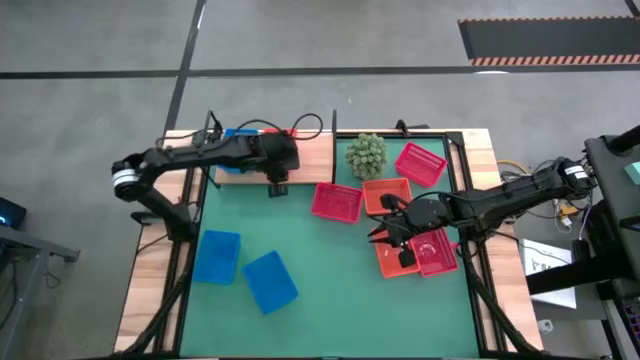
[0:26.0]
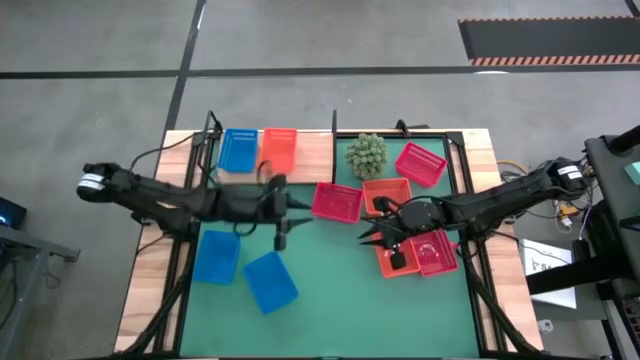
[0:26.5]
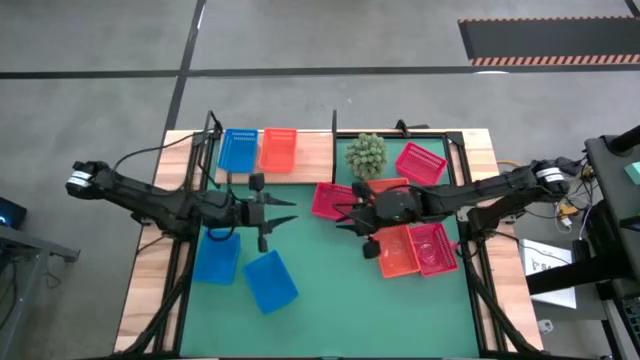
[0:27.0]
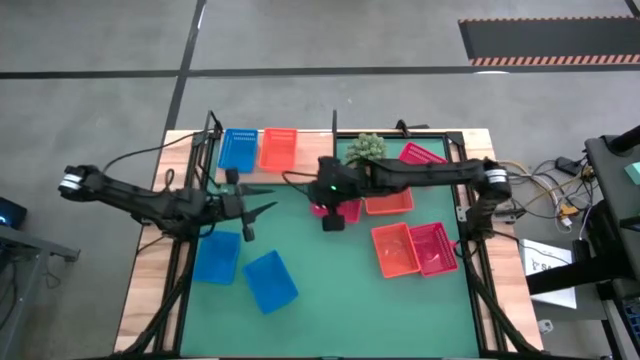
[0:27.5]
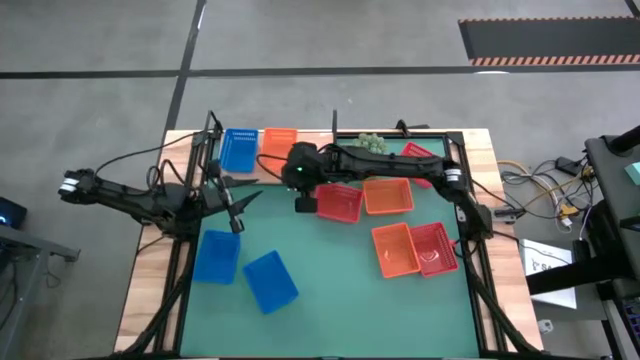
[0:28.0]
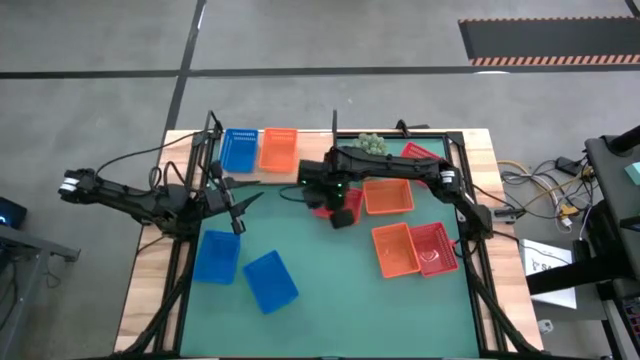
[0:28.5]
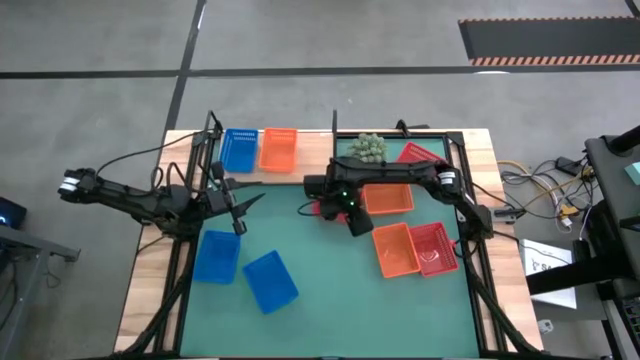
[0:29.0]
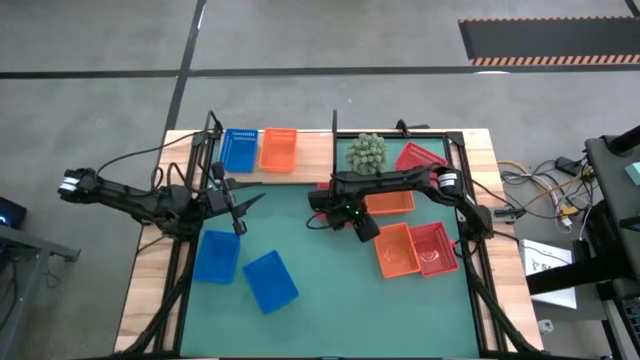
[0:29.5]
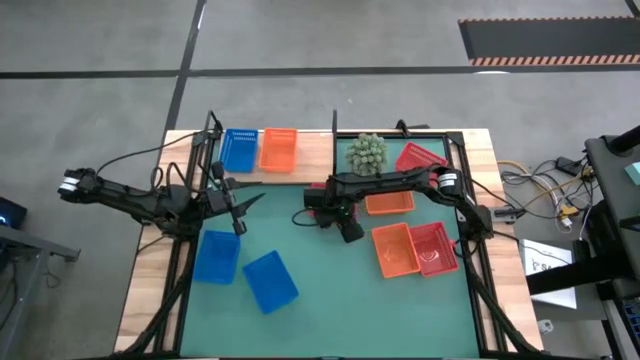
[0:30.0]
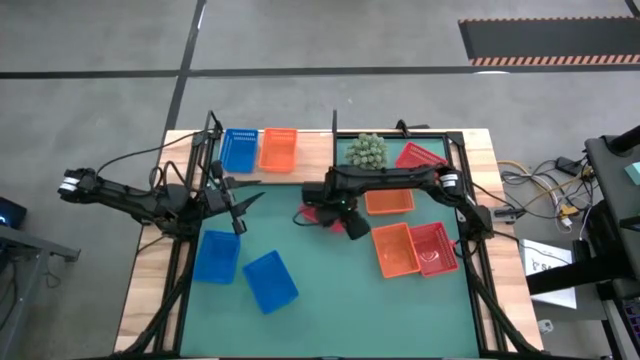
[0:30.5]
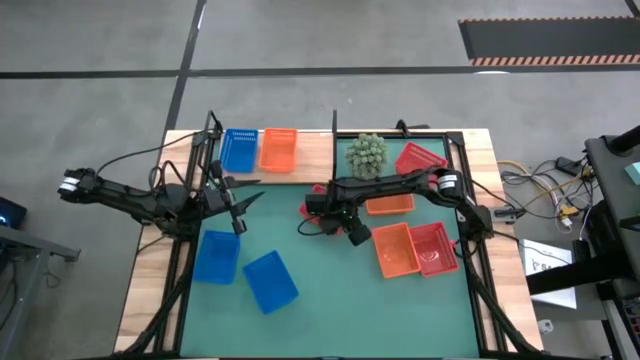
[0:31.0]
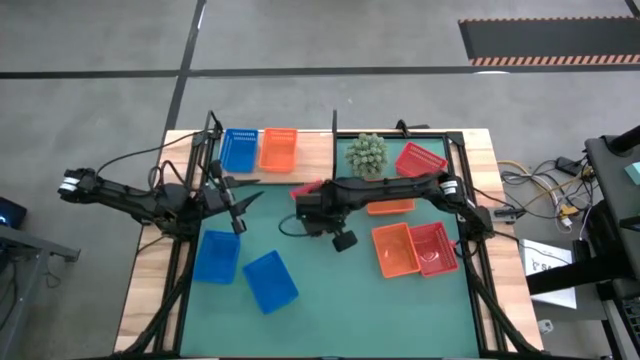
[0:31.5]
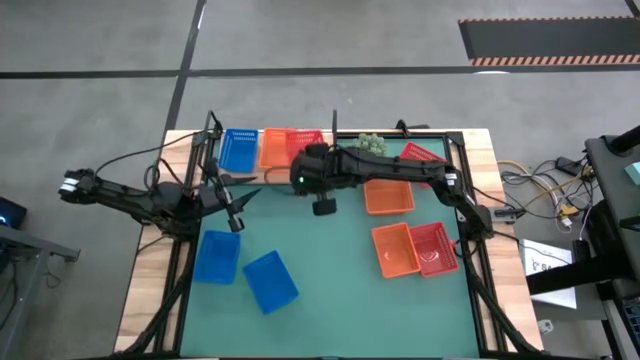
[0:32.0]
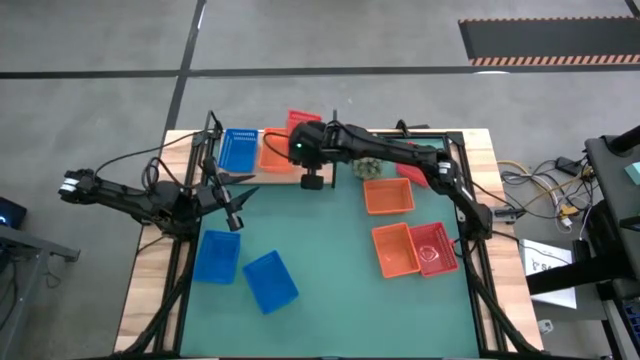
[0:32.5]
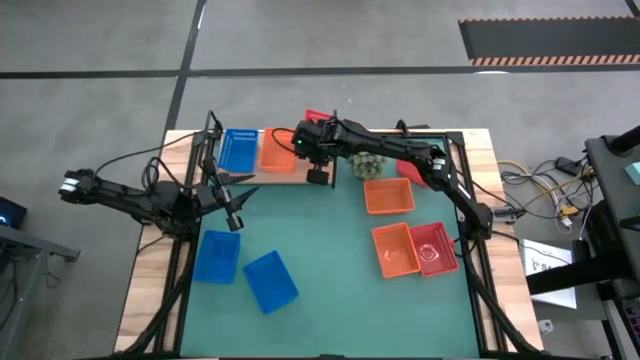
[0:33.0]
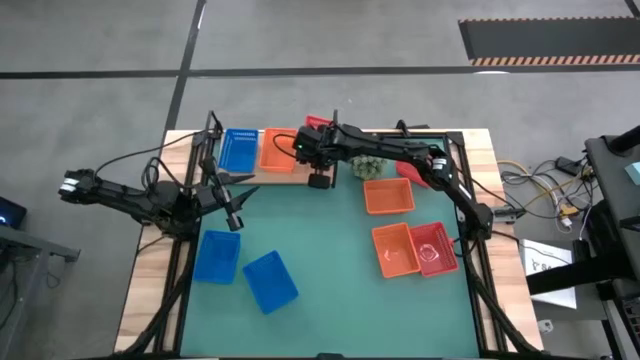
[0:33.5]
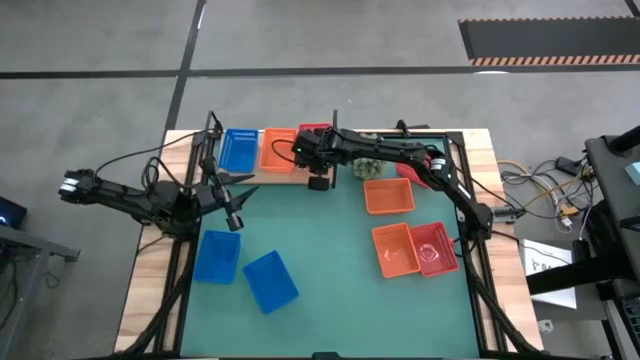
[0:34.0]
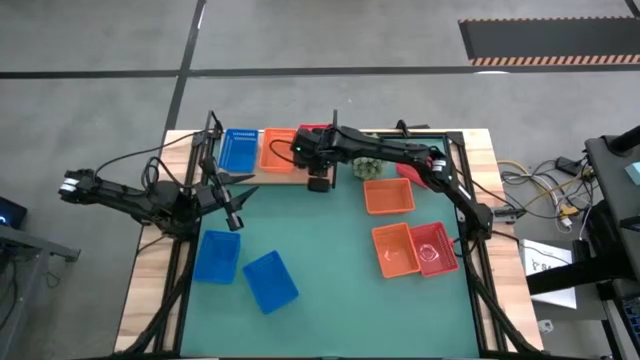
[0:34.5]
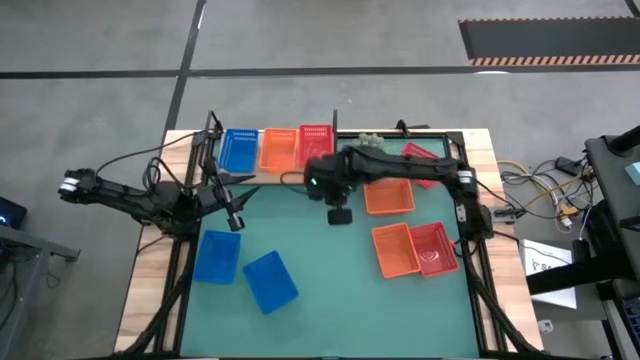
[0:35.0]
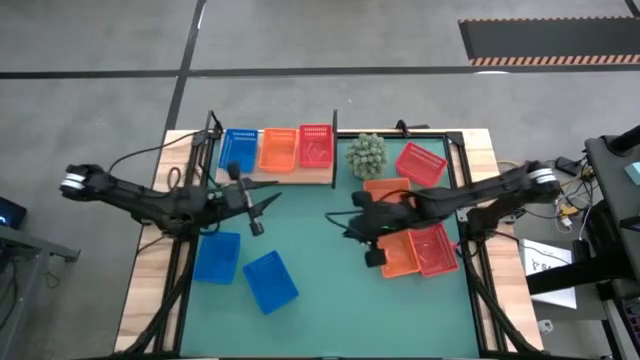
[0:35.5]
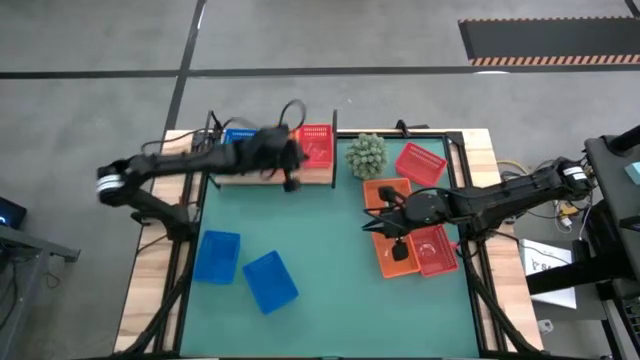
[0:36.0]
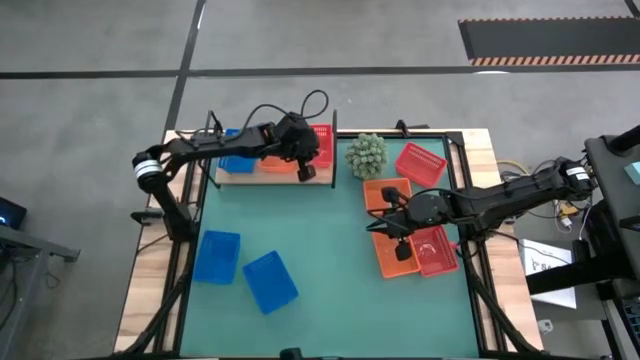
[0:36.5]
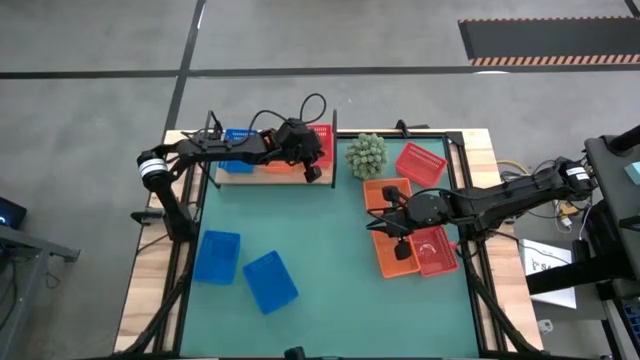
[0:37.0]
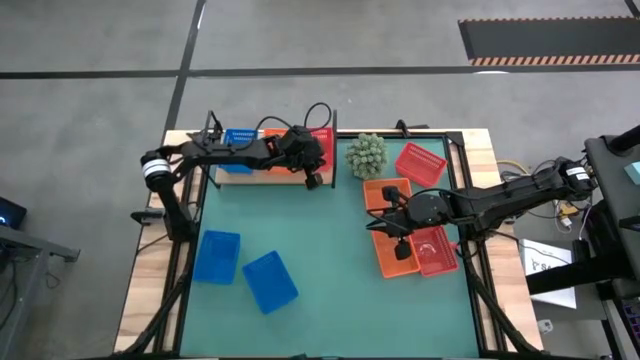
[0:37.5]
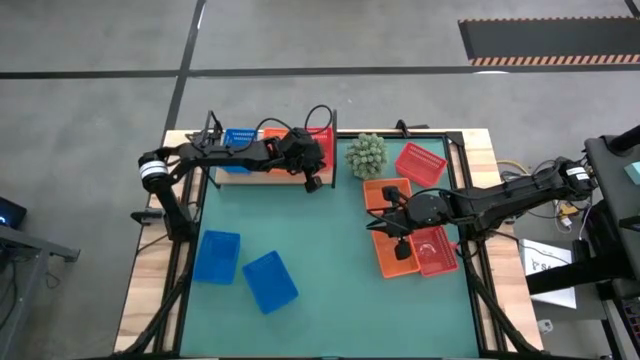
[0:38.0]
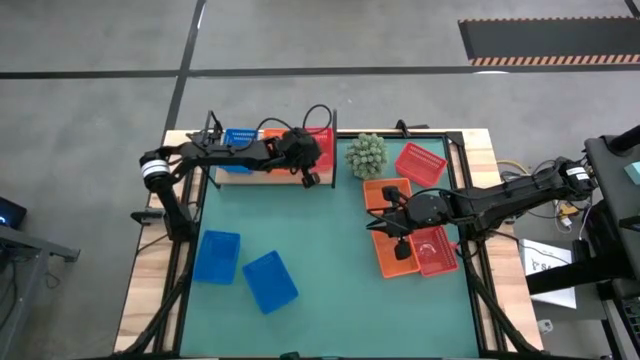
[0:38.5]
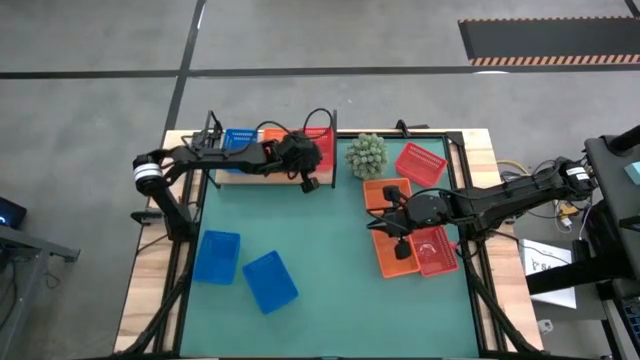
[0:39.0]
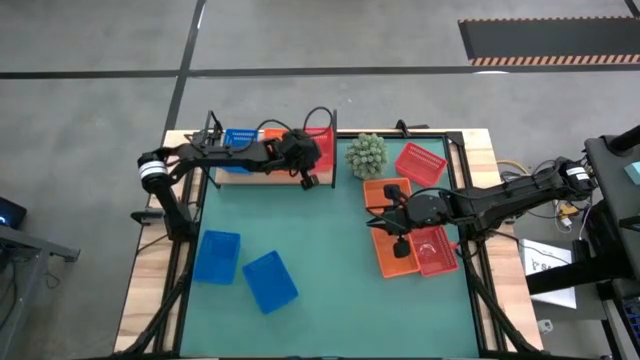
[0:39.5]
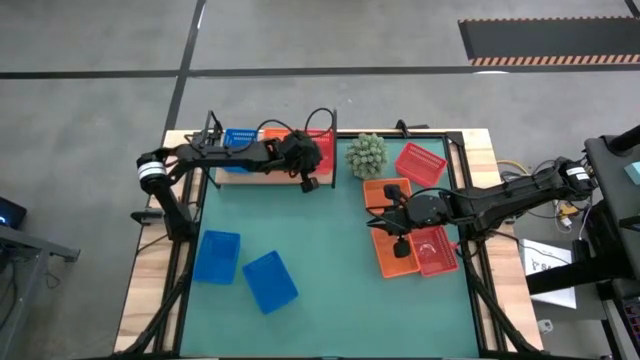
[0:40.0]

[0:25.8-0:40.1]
Task: Stack baskets on shelf by color
Put the left red bin on the shelf

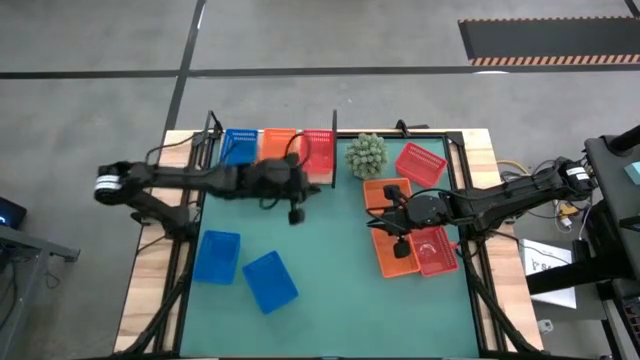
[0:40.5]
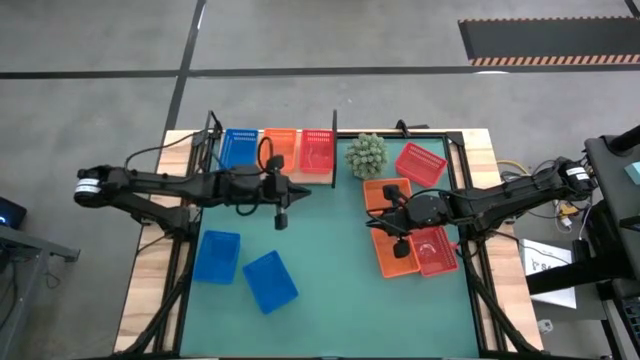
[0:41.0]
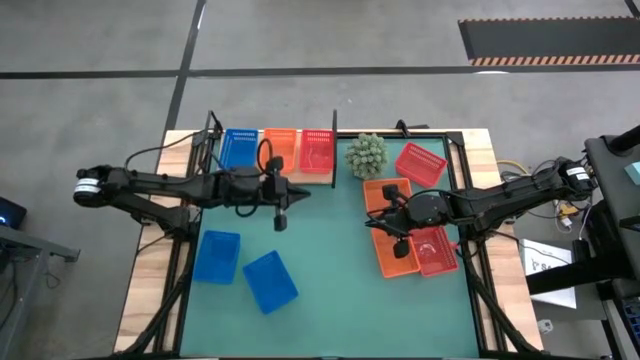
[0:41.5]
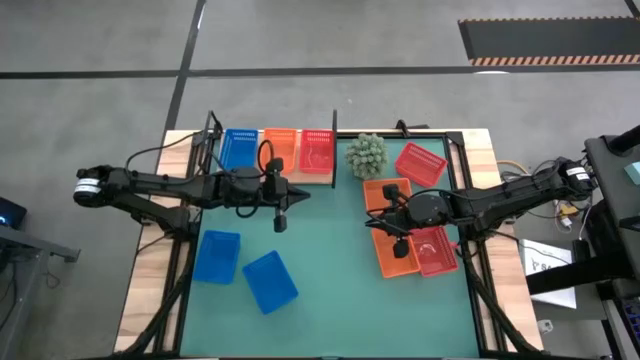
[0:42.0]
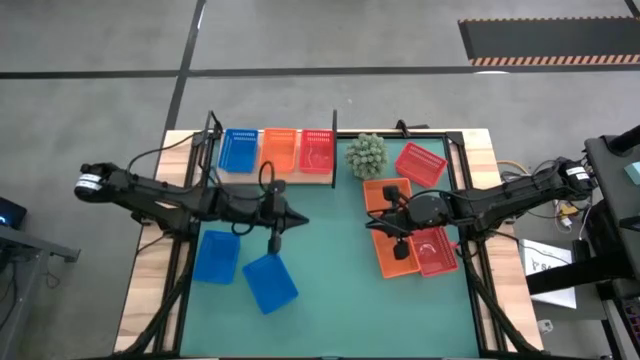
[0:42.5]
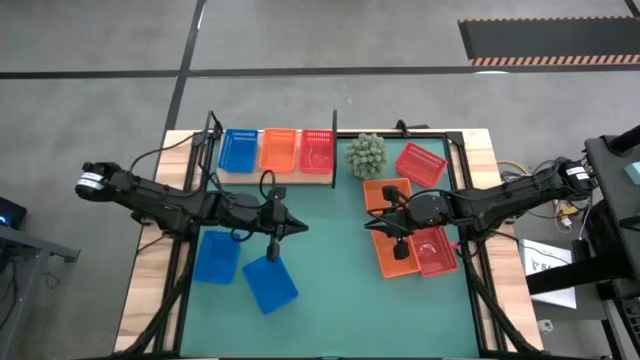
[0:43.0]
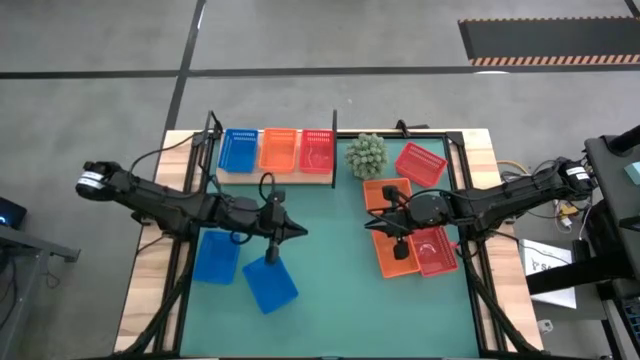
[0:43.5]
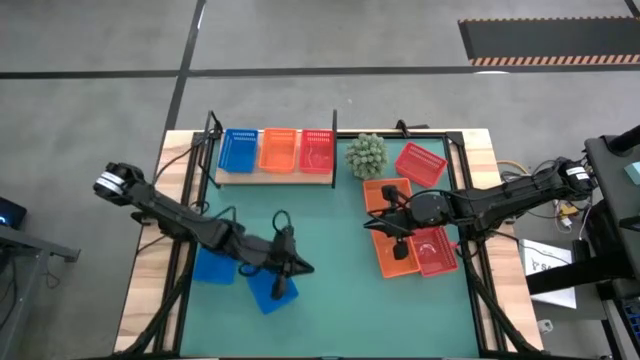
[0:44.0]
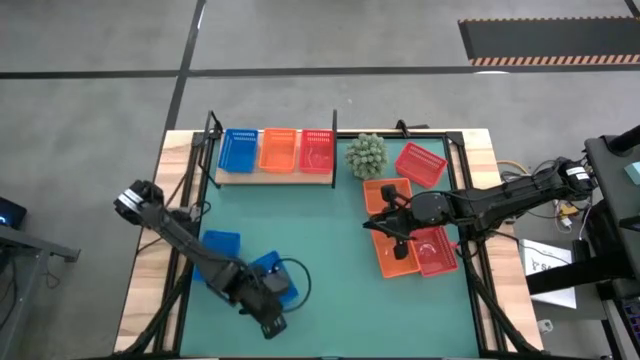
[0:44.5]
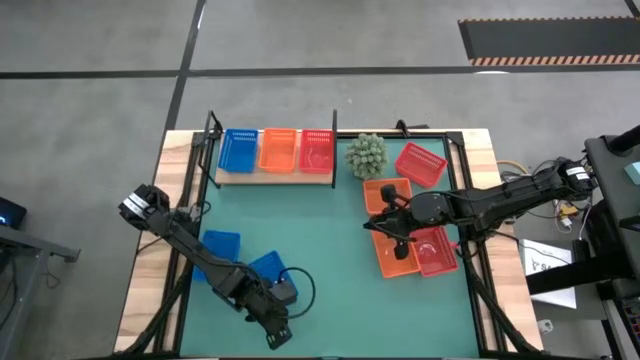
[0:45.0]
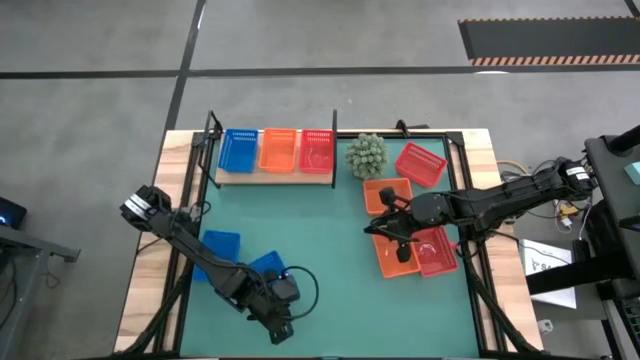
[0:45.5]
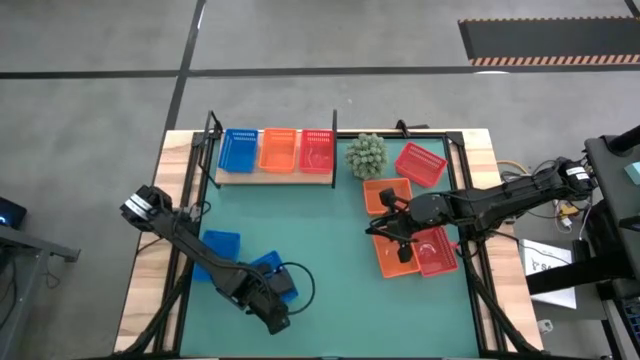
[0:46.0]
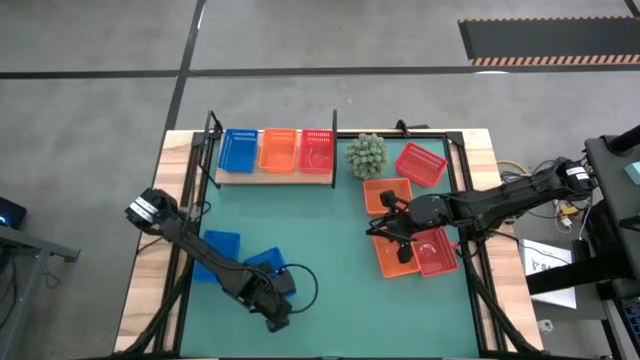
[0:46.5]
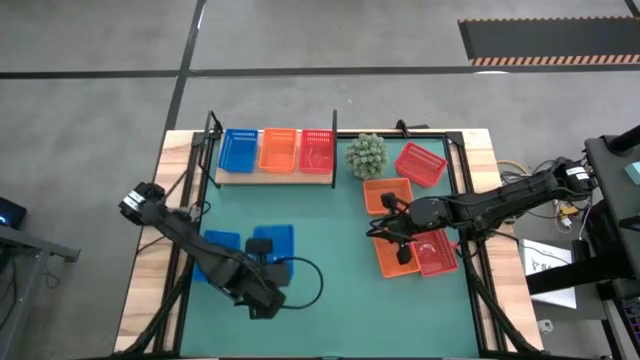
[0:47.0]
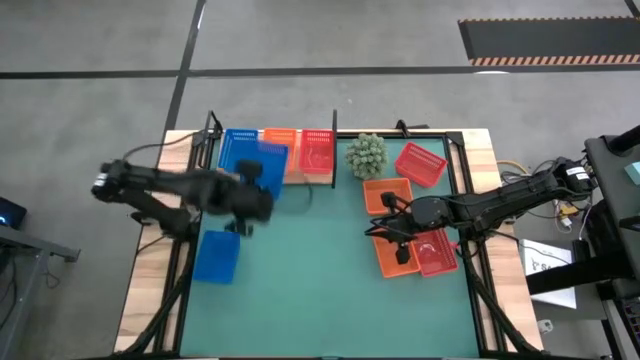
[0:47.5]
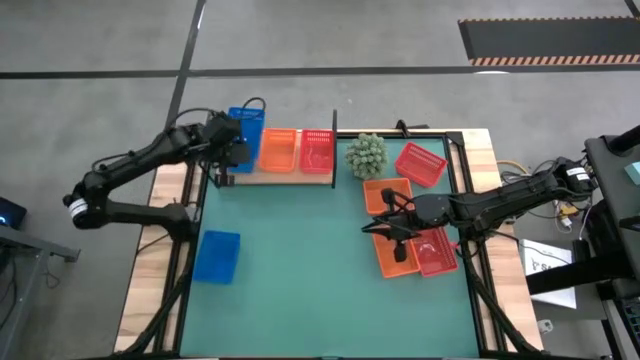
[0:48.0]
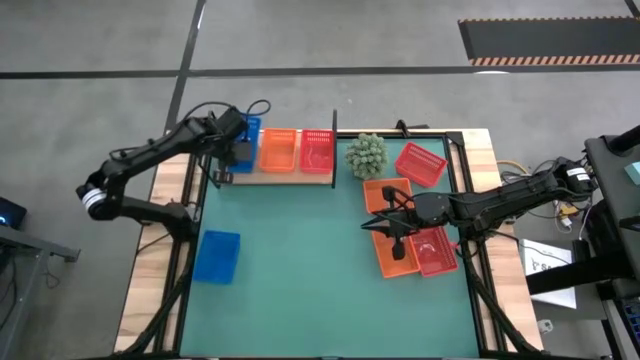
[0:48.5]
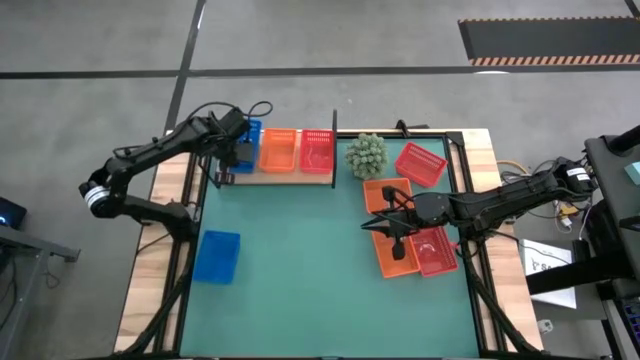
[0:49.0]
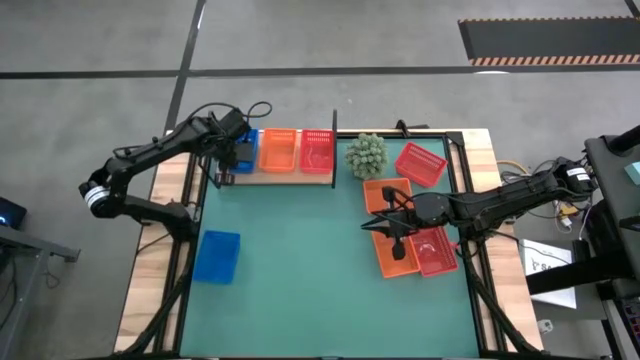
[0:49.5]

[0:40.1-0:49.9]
Stack the right blue bin on the blue bin on the shelf
